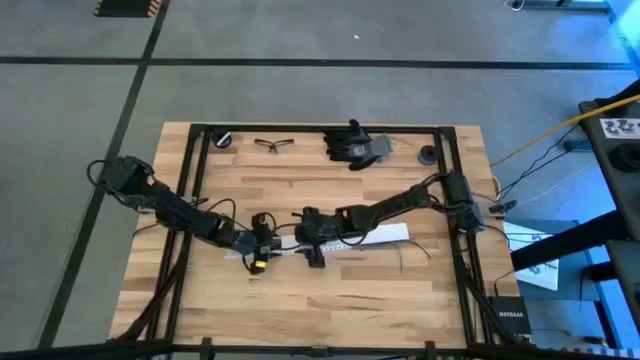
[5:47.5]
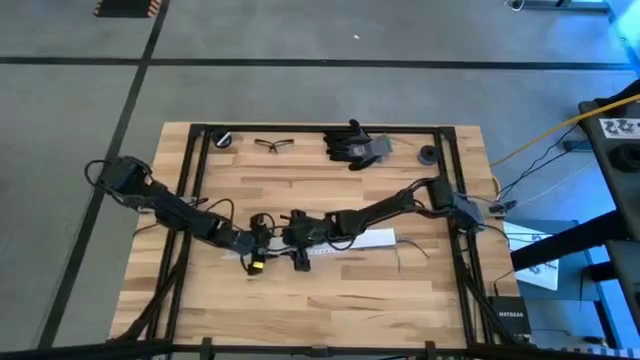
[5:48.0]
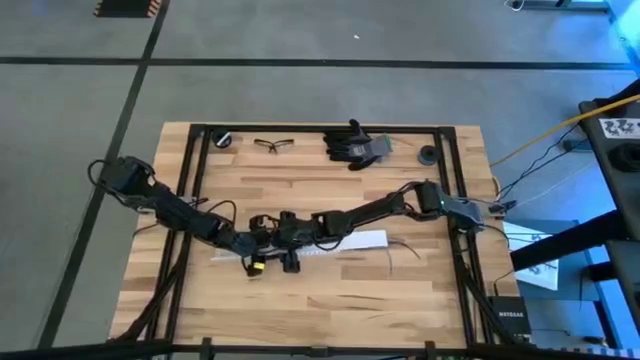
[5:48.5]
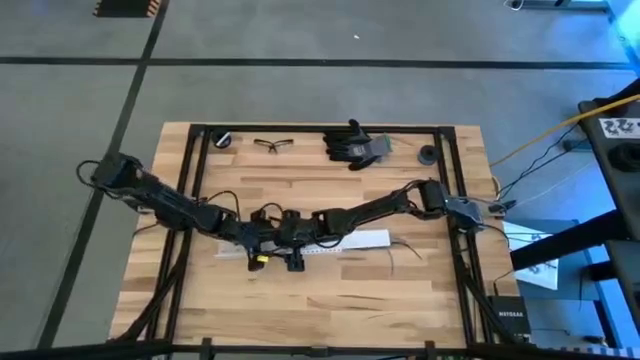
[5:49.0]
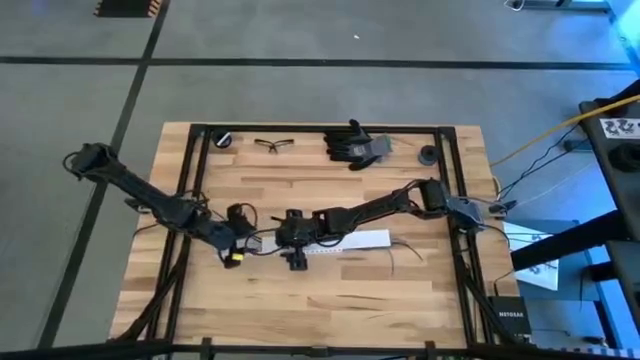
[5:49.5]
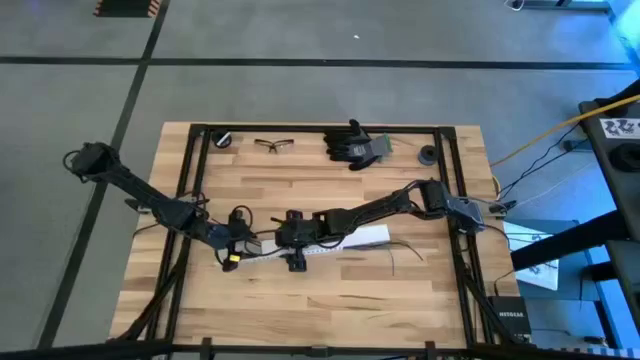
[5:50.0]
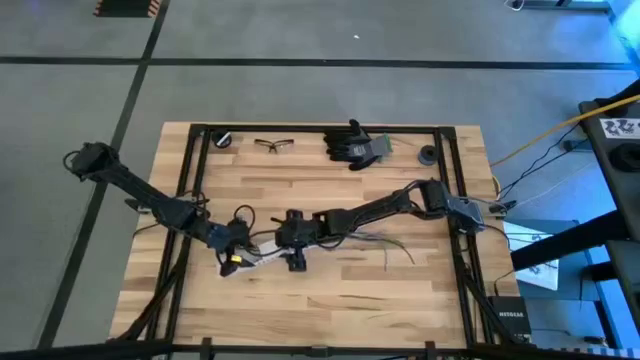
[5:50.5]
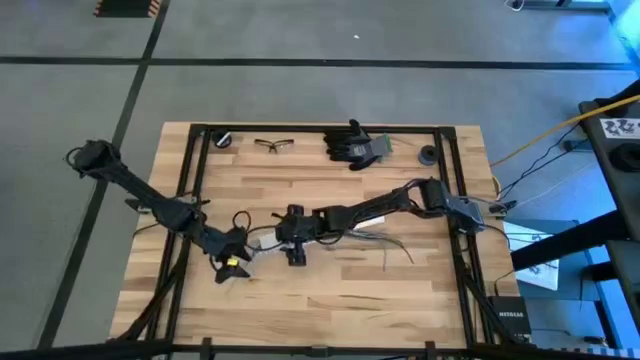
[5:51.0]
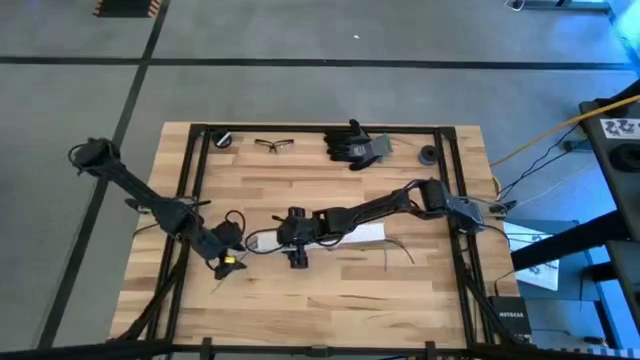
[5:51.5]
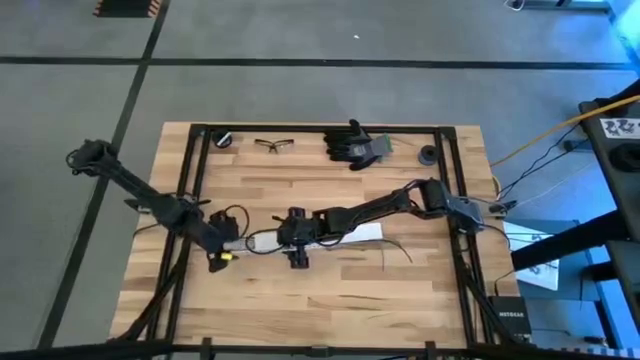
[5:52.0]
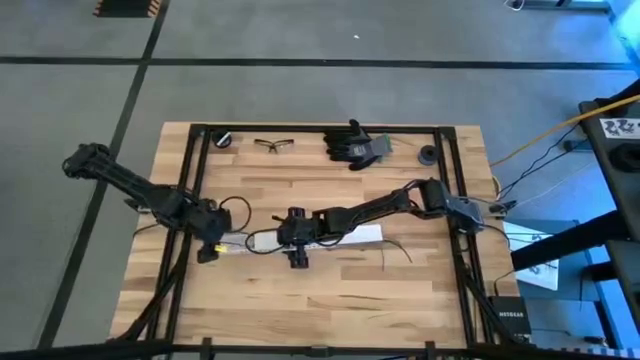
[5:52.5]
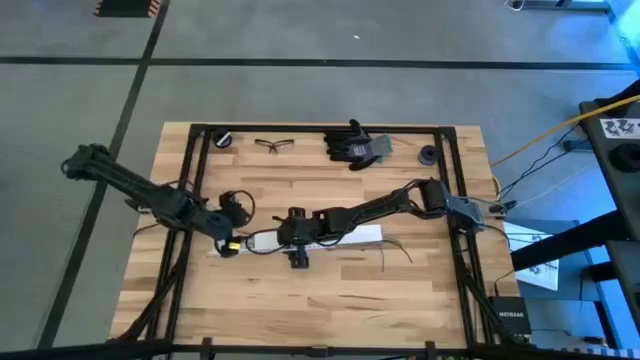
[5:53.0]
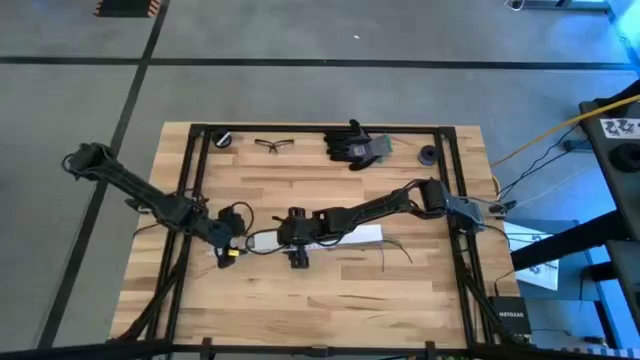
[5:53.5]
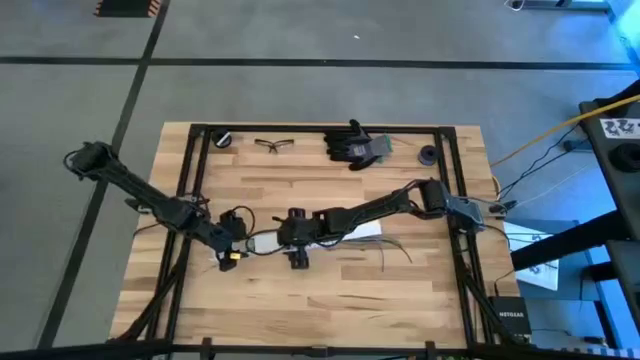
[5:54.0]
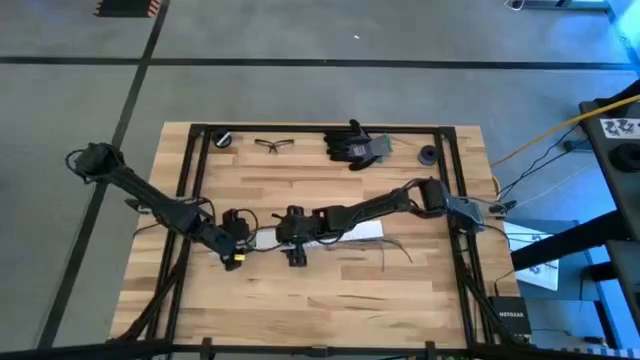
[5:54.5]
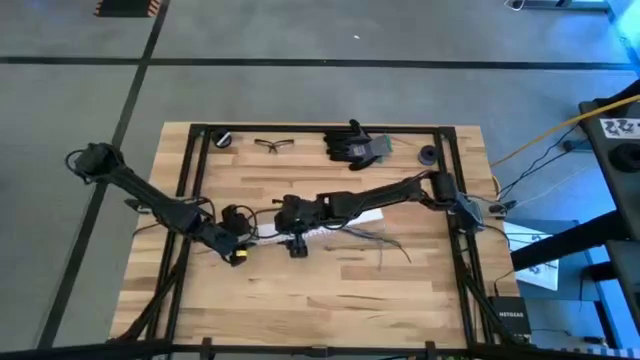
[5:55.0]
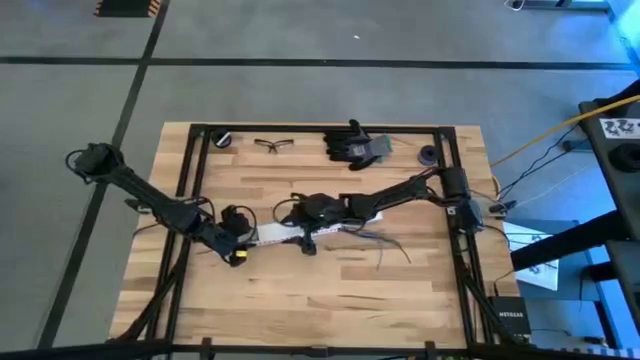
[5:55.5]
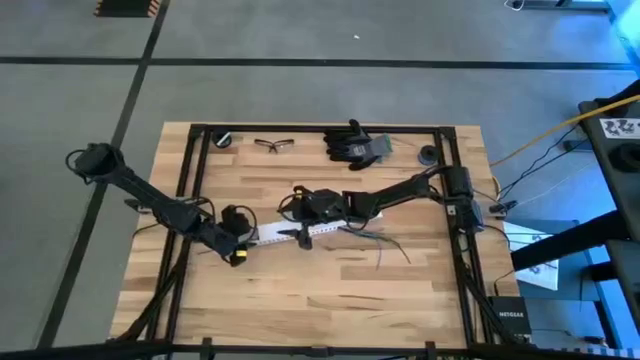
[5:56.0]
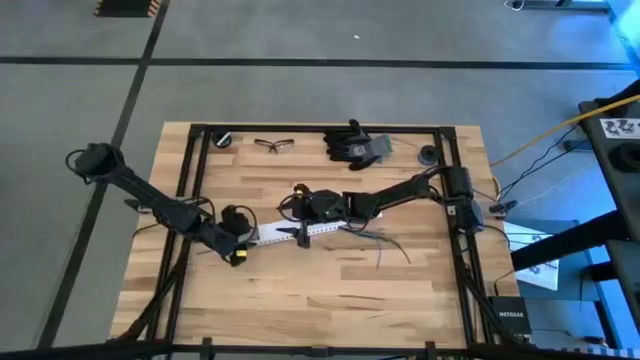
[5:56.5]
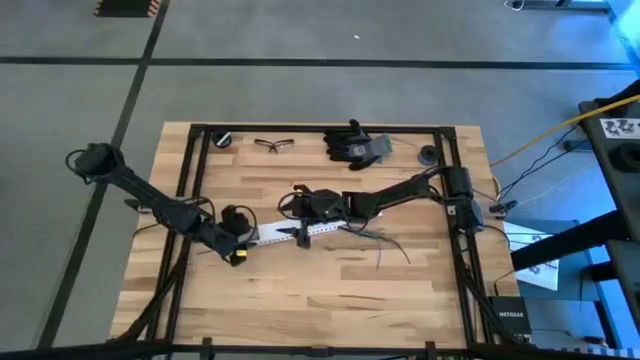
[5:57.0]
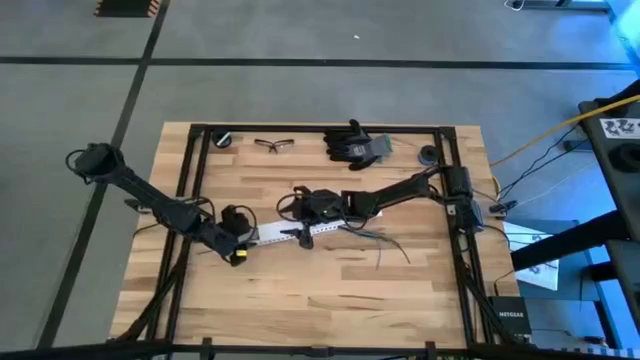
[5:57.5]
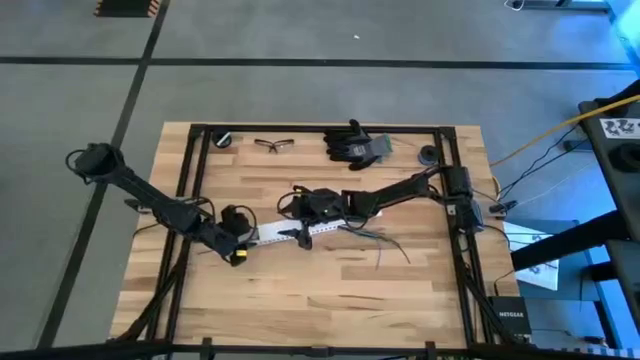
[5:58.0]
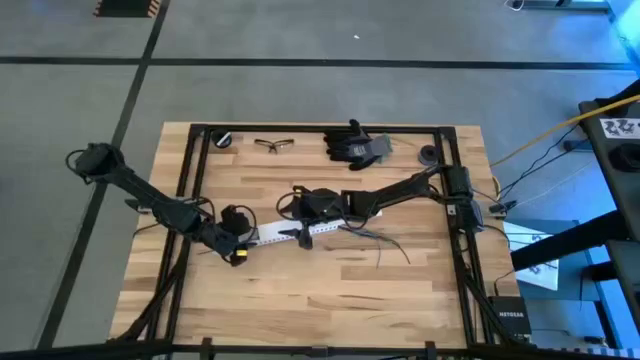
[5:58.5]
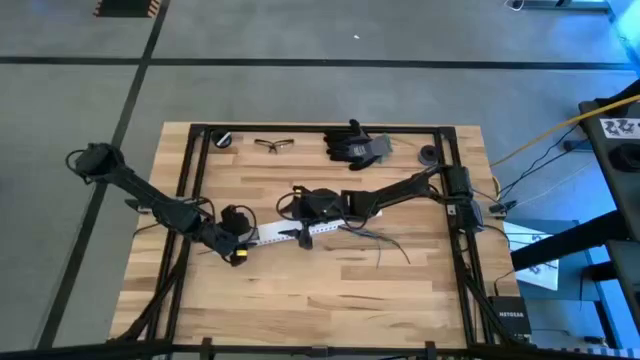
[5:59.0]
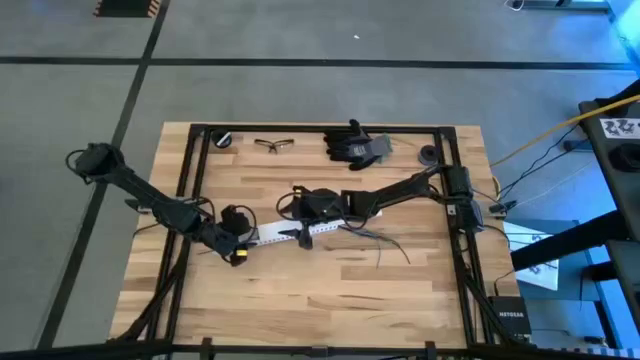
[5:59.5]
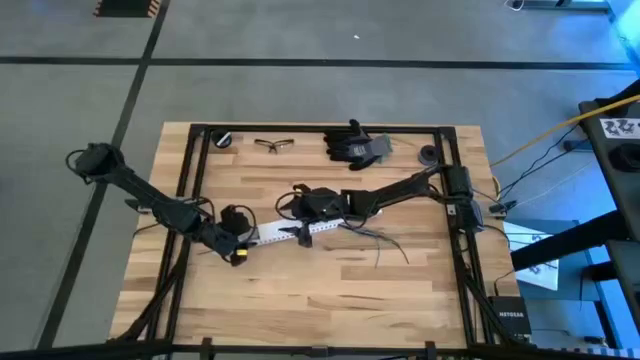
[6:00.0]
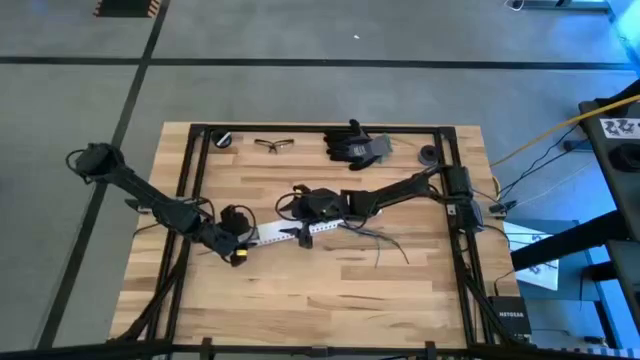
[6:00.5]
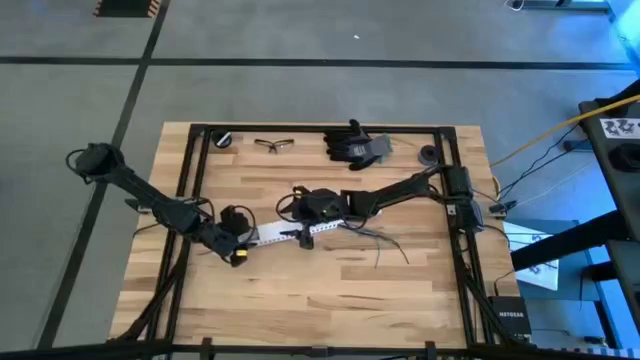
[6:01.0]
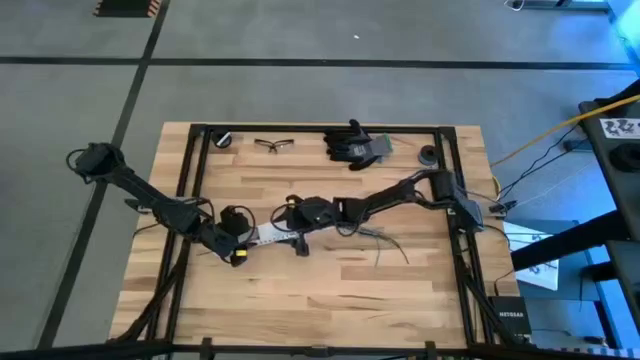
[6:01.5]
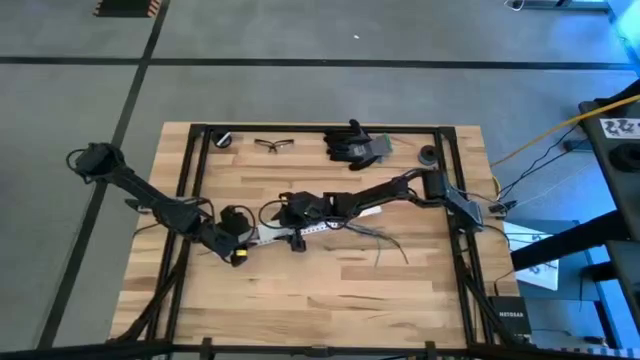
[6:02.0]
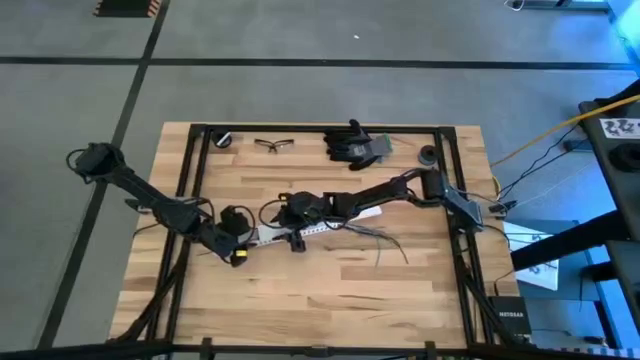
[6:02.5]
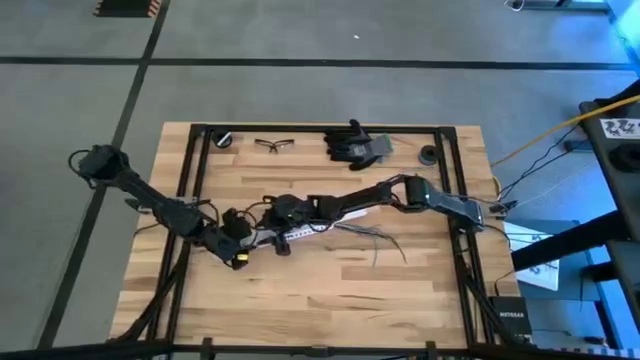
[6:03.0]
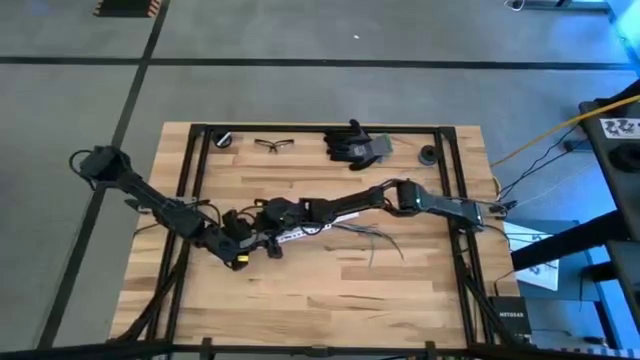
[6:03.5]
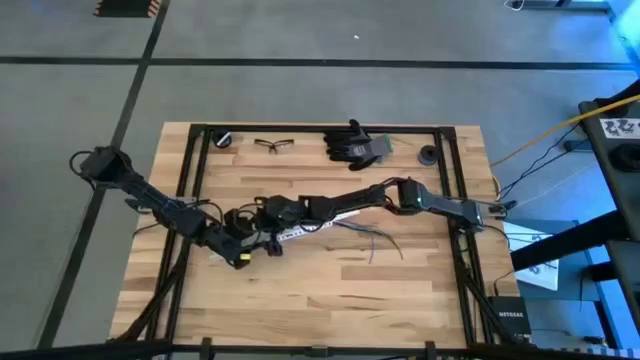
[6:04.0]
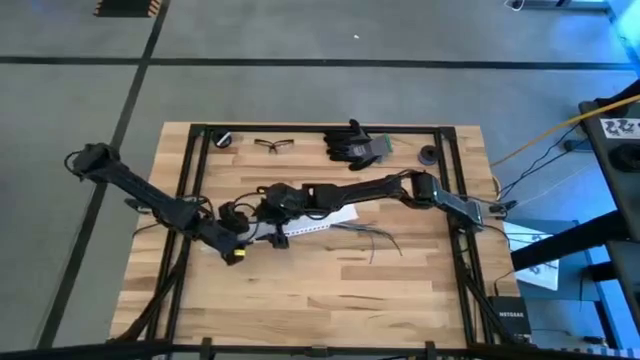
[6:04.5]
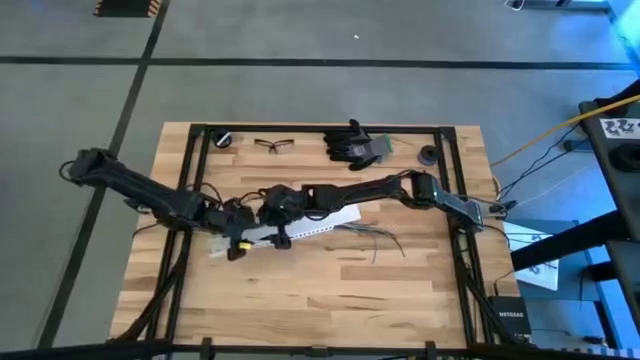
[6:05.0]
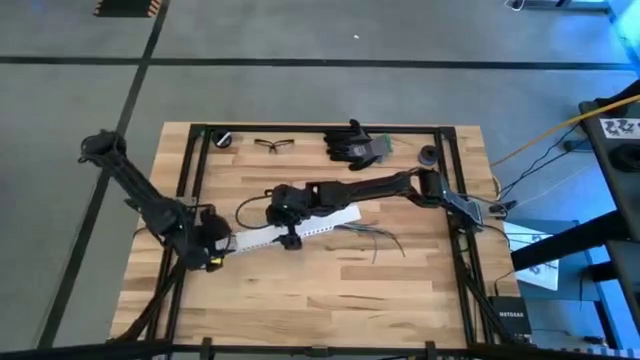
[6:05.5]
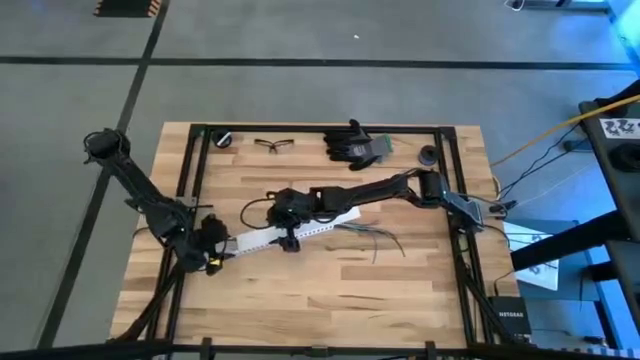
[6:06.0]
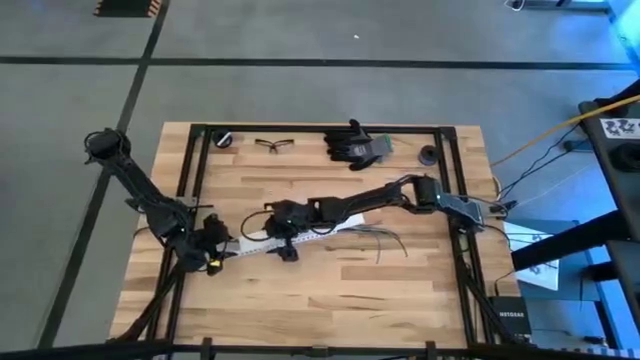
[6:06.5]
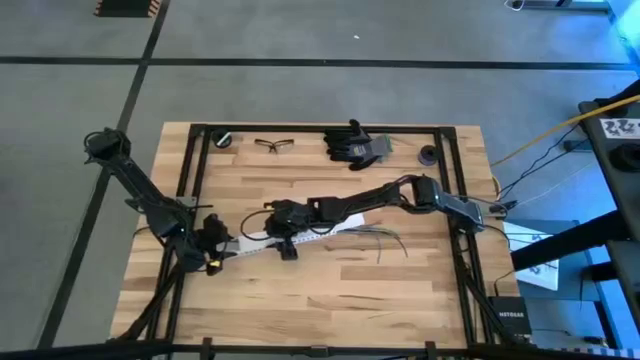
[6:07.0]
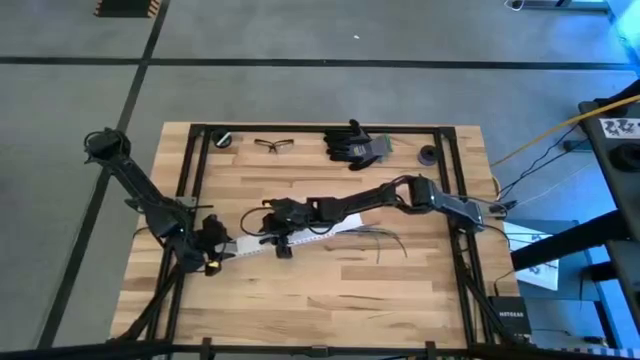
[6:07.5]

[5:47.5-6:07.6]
Task: Ziptie cables
Close the white cable duct

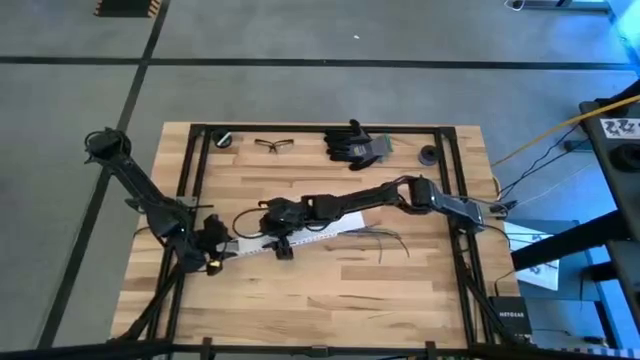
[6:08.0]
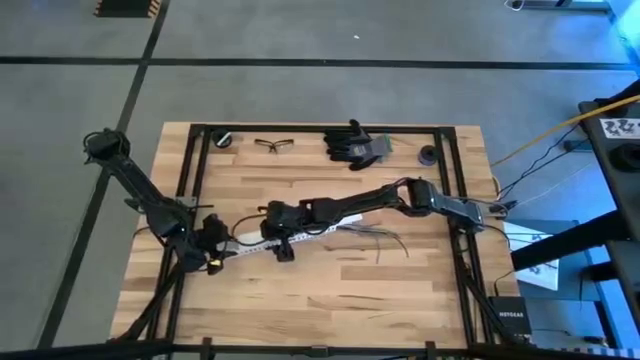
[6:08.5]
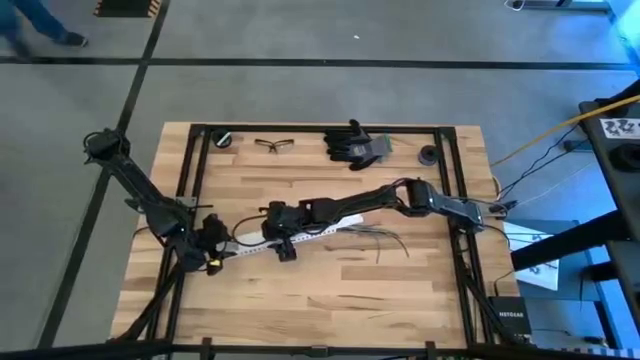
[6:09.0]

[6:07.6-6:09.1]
Close the white cable duct
